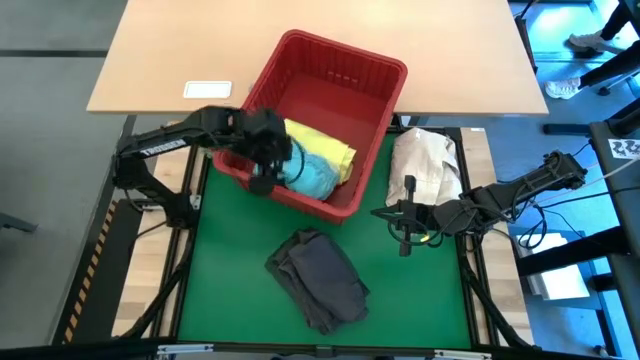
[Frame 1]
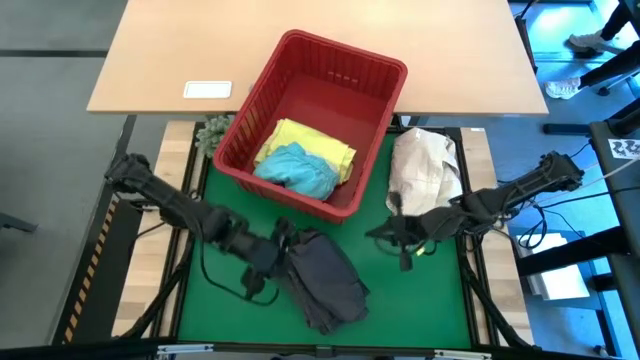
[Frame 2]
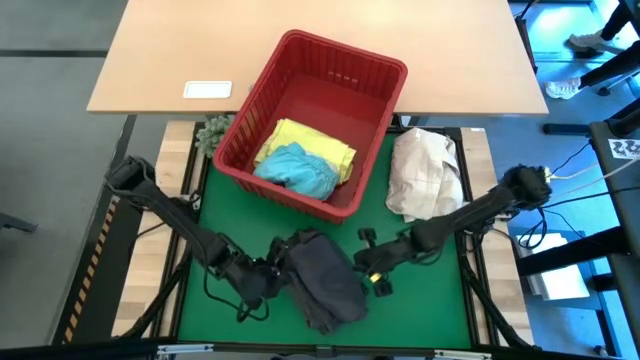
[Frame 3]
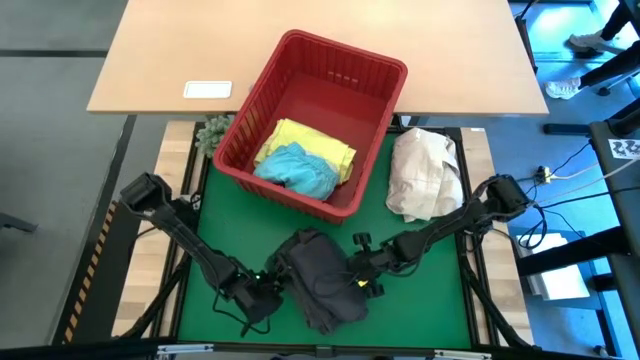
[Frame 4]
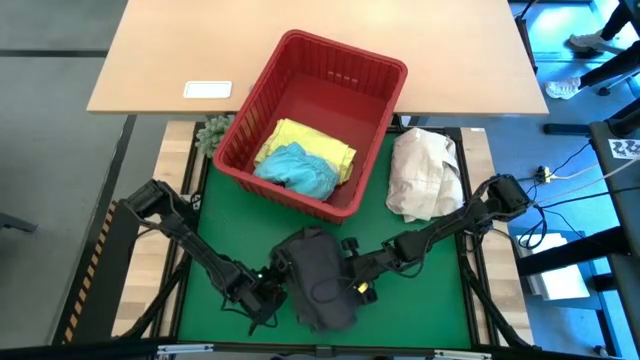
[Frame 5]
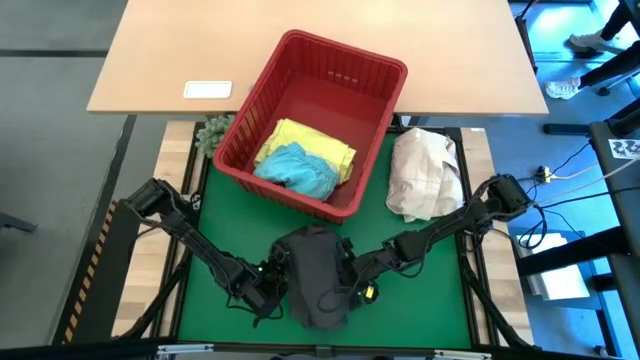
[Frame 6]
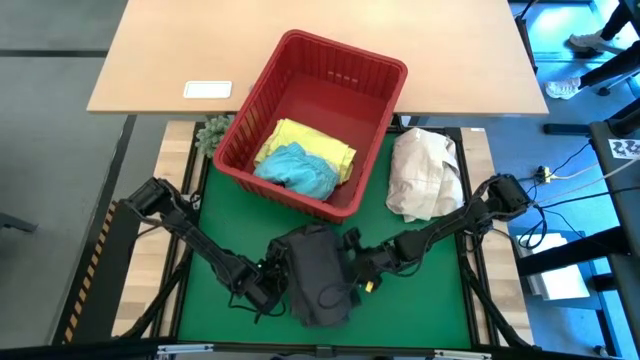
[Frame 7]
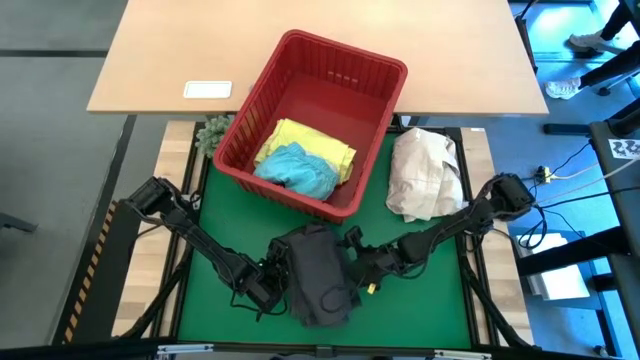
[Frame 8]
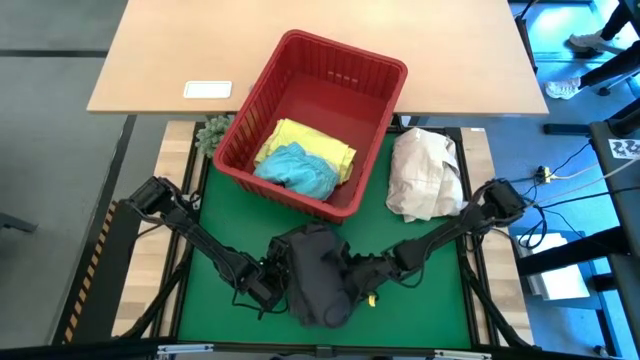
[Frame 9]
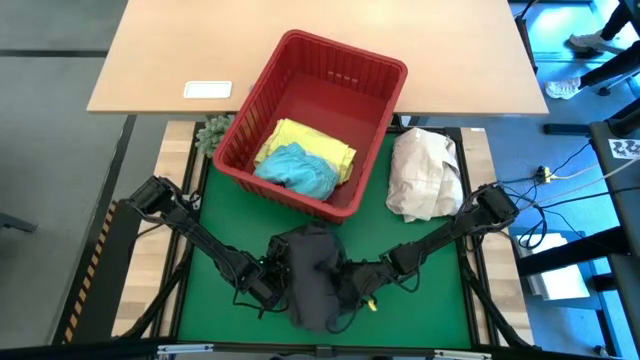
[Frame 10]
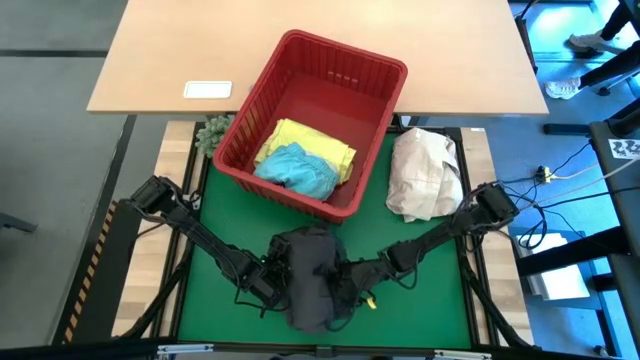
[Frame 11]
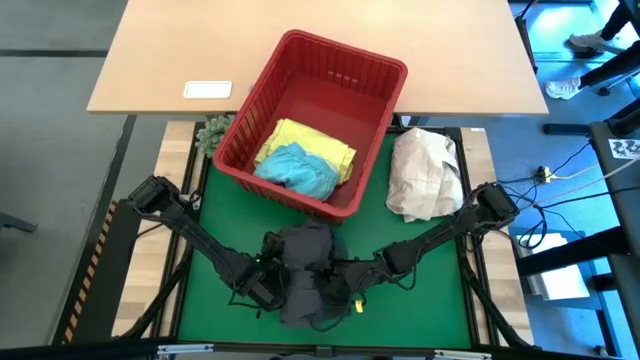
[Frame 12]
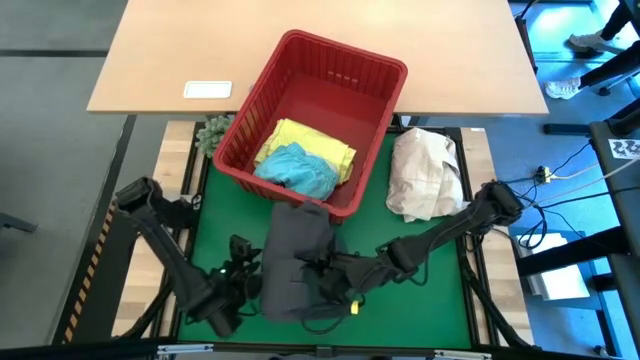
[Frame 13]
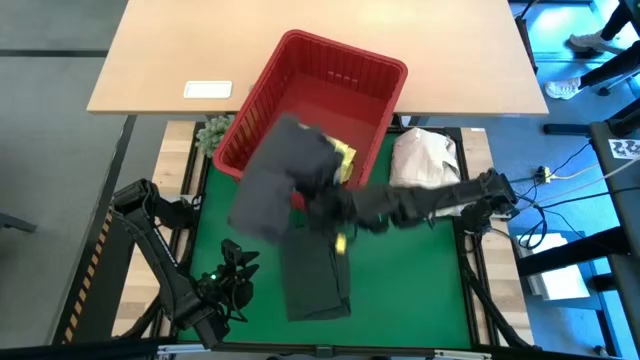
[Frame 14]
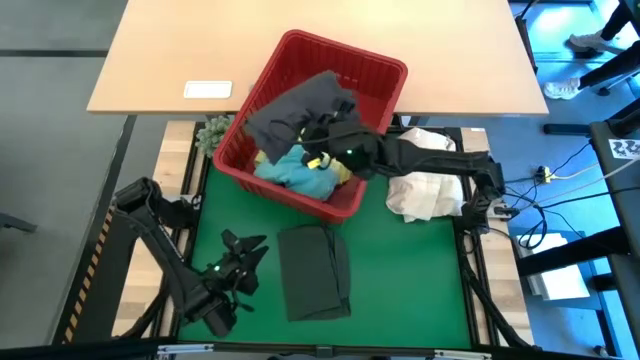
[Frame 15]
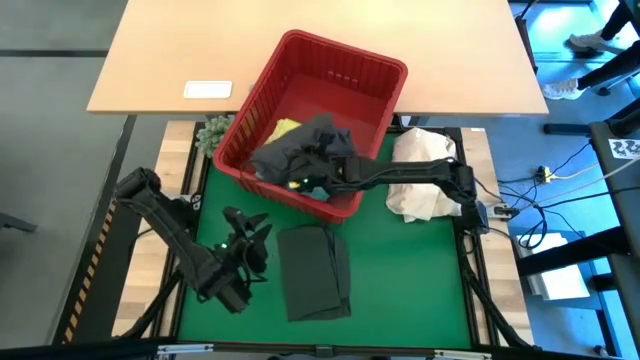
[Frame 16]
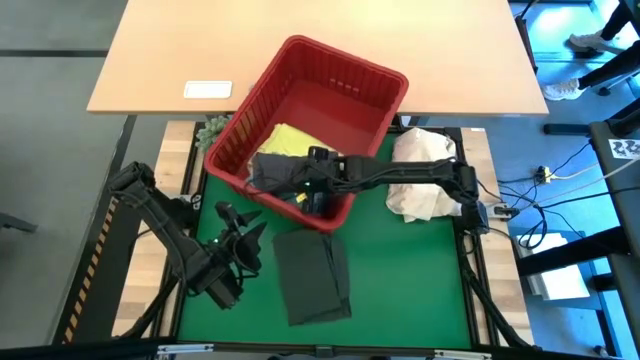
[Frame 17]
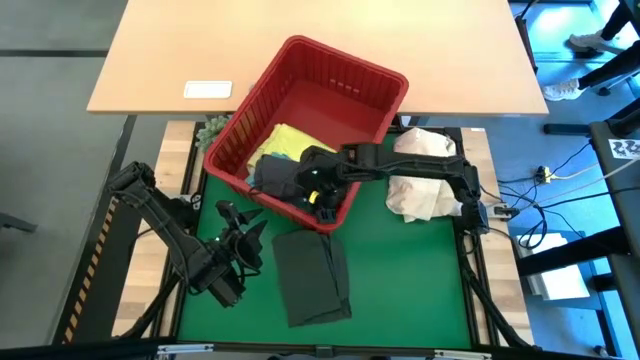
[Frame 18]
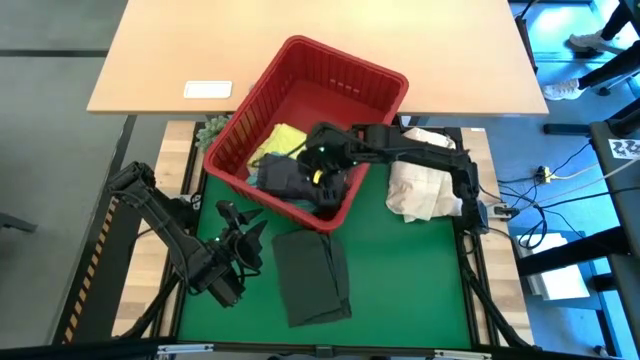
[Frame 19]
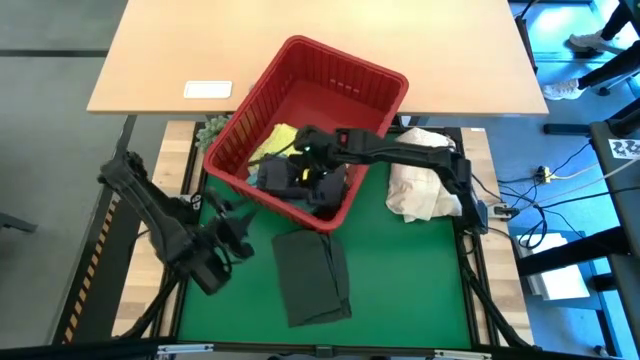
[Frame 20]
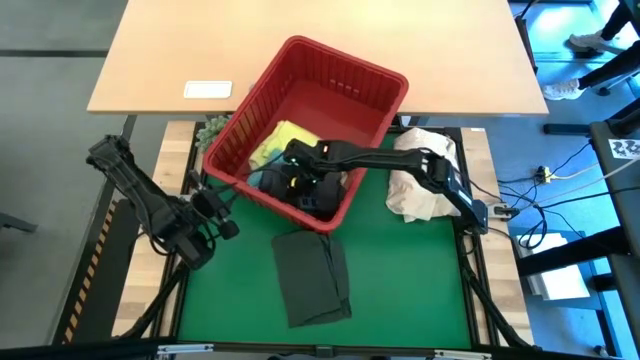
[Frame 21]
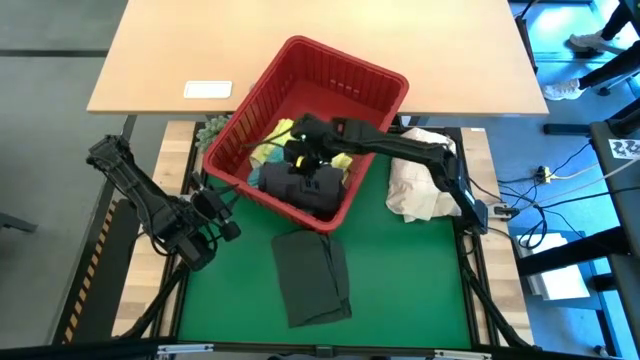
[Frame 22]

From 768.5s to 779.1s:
Task: Fold Laundry from Bin
Put the gray short into the red bin

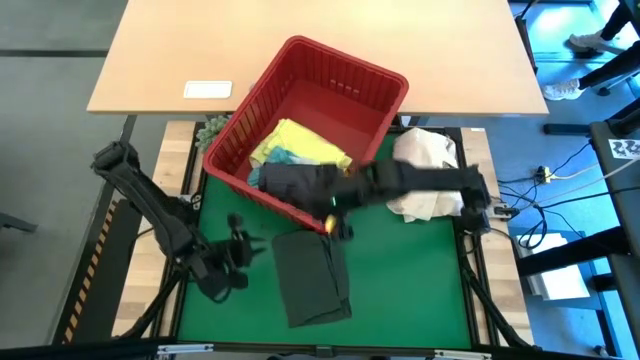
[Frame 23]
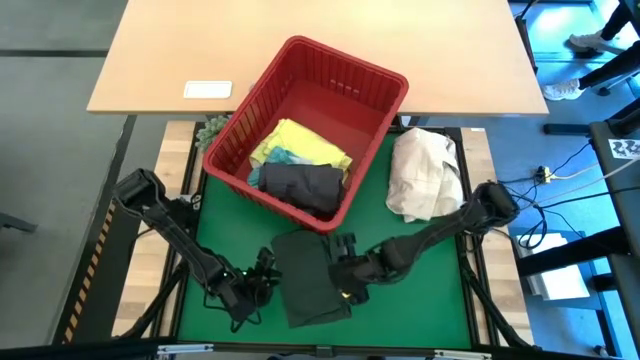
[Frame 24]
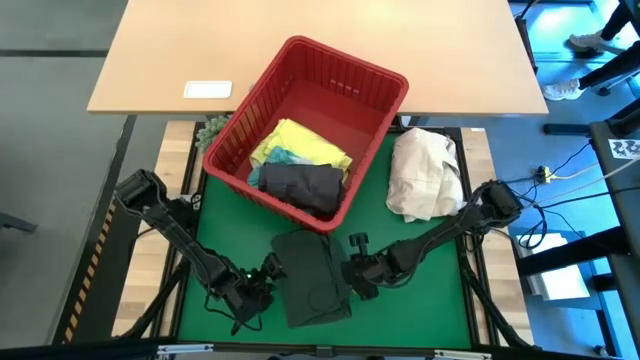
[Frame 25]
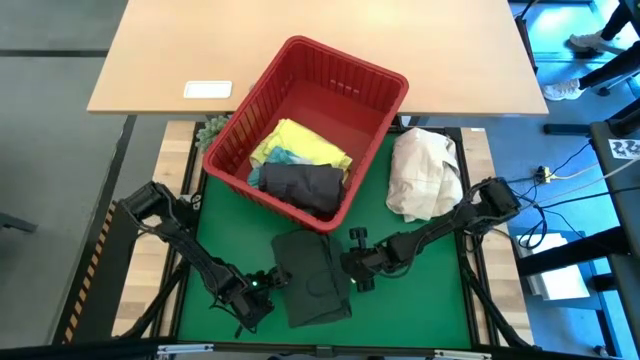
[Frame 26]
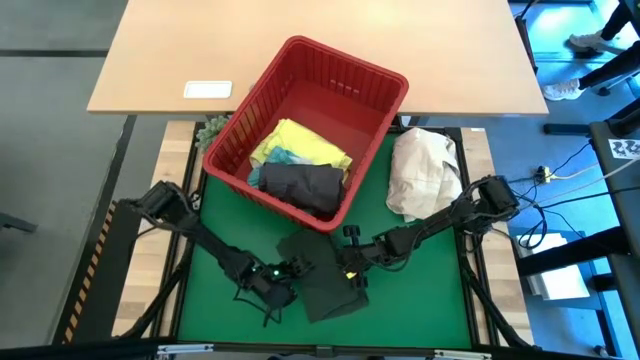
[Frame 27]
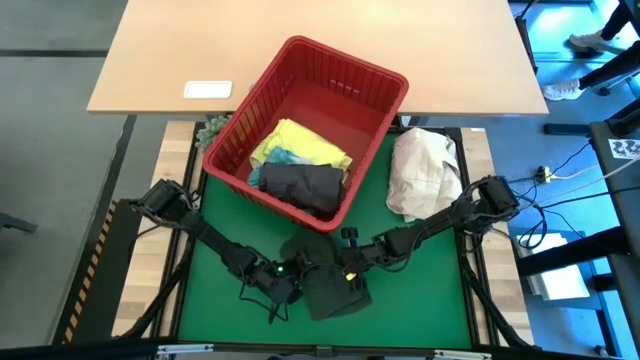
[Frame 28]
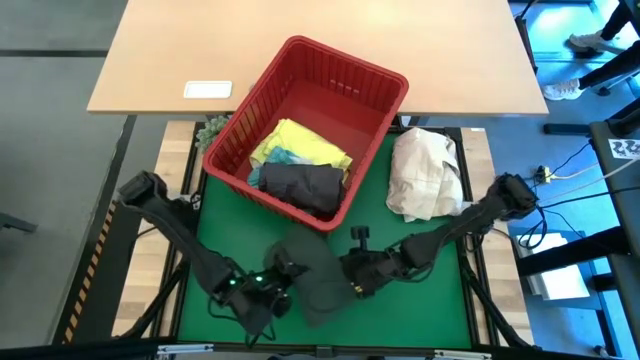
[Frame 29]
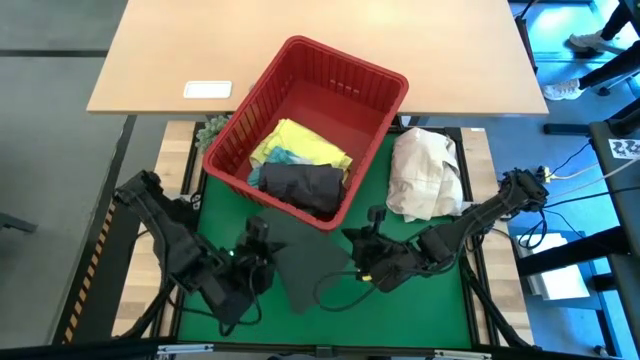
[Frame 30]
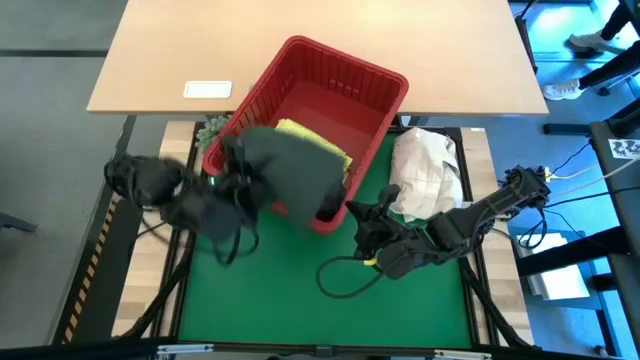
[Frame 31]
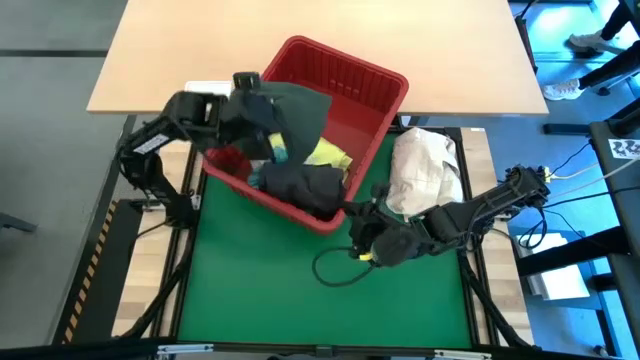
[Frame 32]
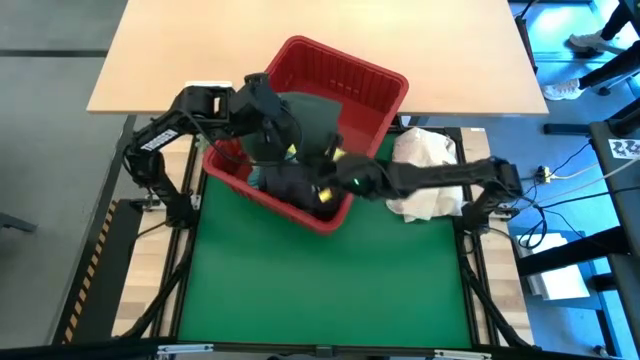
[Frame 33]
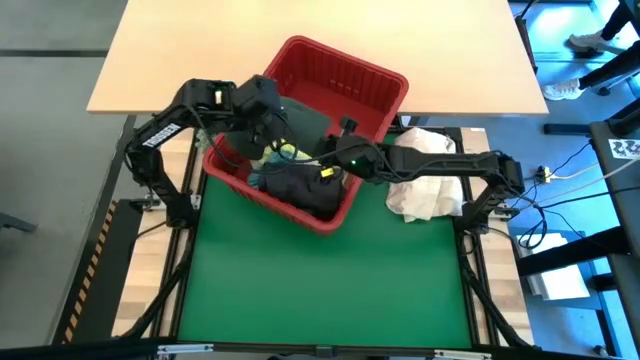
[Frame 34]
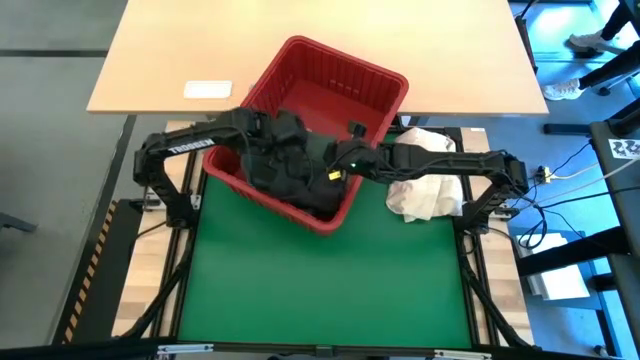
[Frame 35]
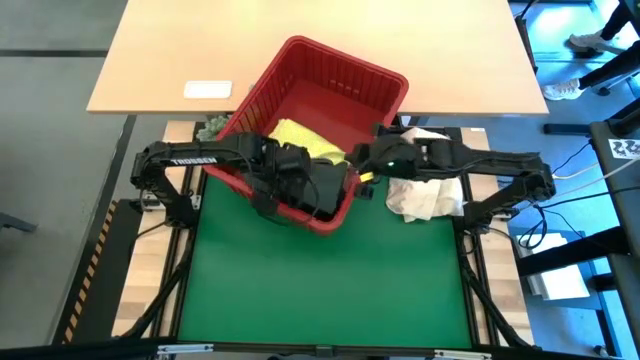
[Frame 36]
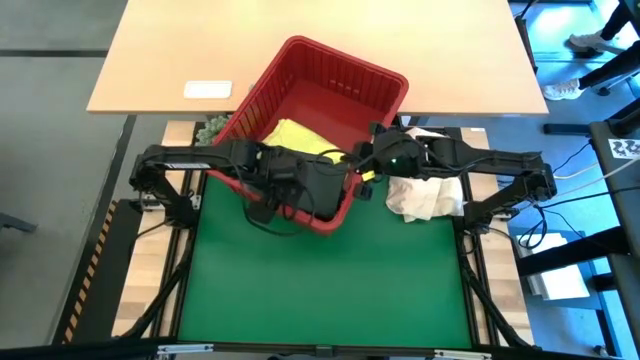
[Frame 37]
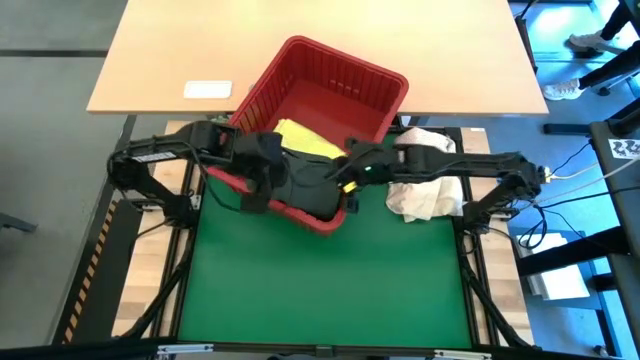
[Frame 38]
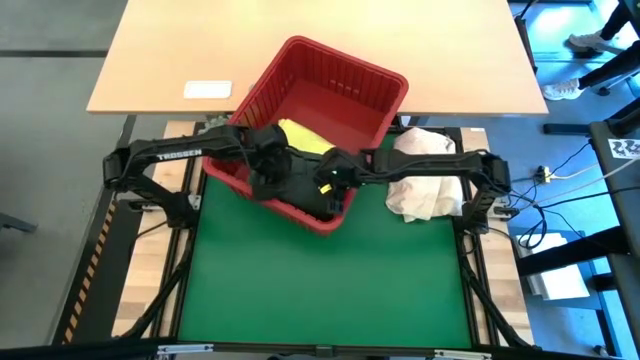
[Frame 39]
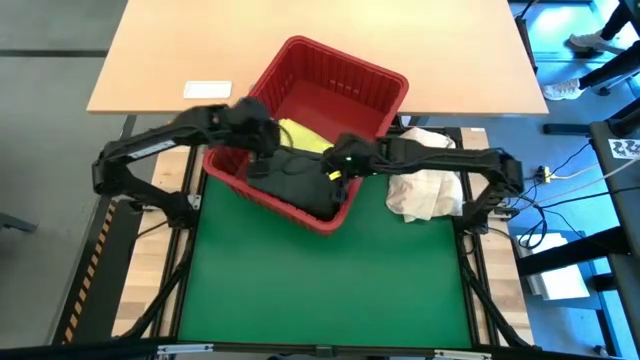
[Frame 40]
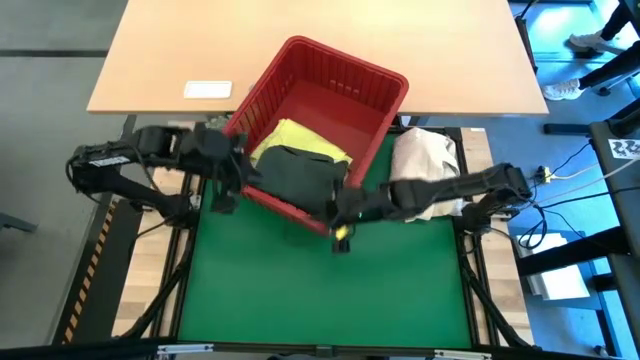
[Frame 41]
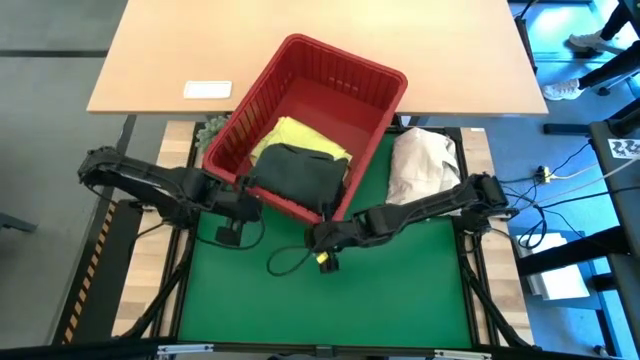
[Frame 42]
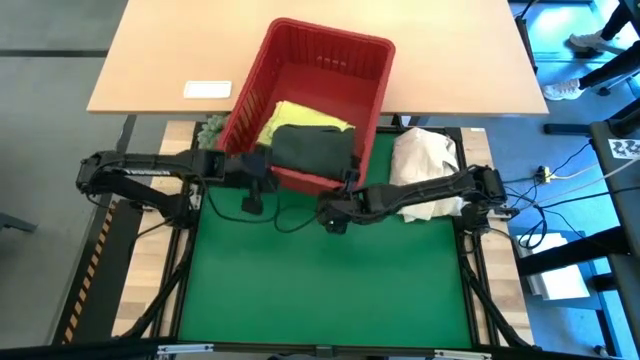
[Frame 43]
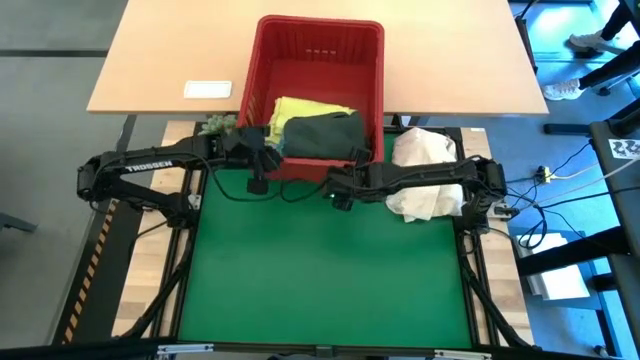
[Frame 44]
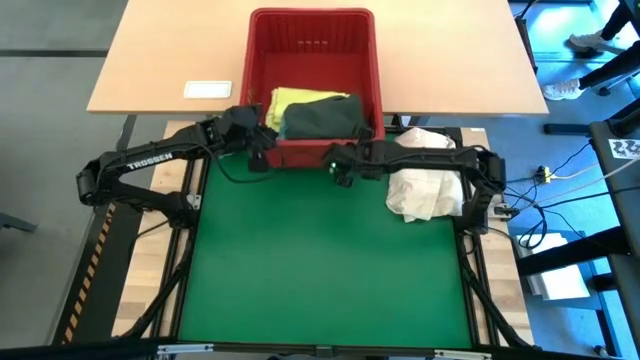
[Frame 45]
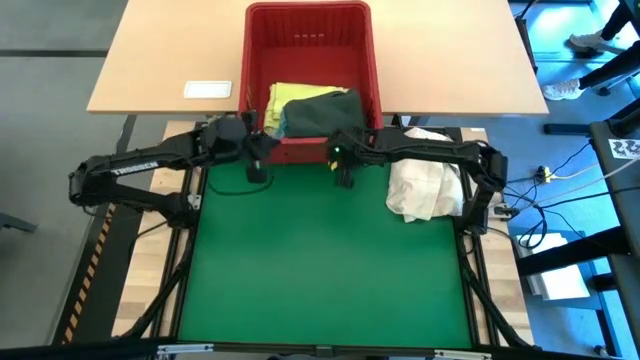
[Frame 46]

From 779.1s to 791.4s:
Put the dark green polo into the red bin
